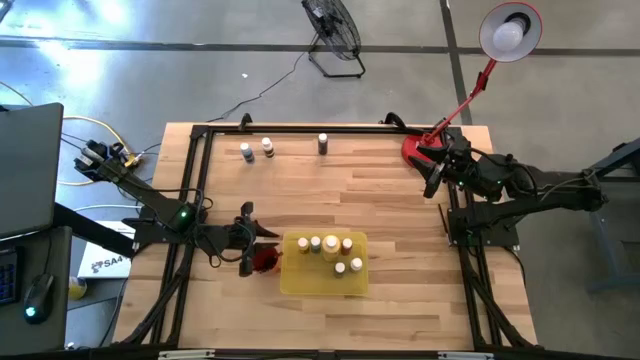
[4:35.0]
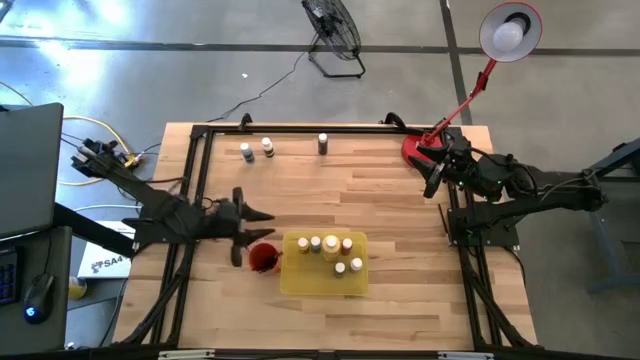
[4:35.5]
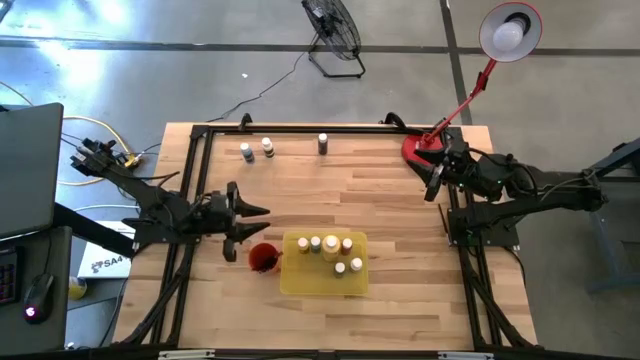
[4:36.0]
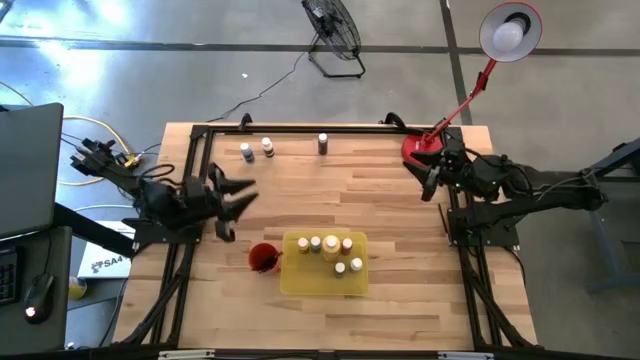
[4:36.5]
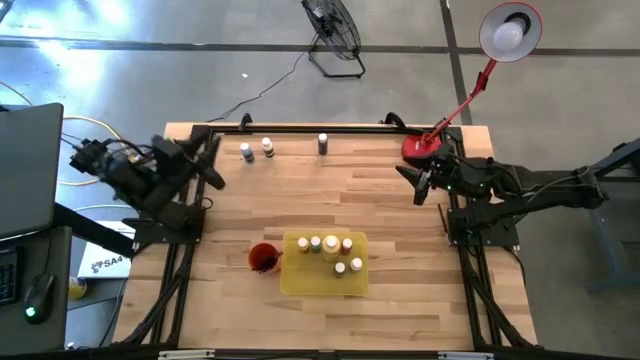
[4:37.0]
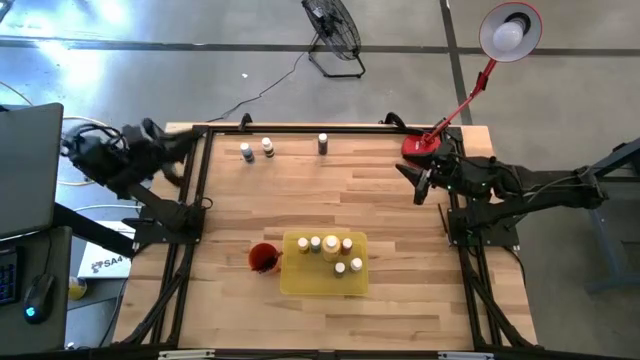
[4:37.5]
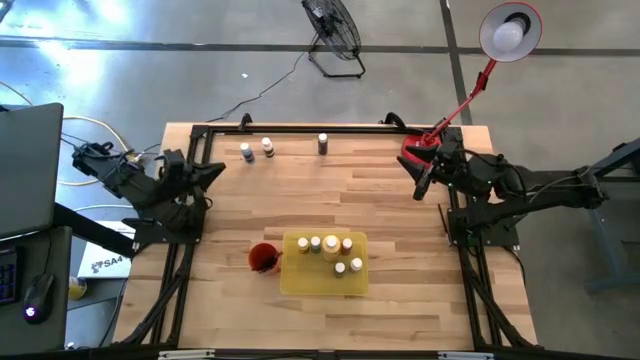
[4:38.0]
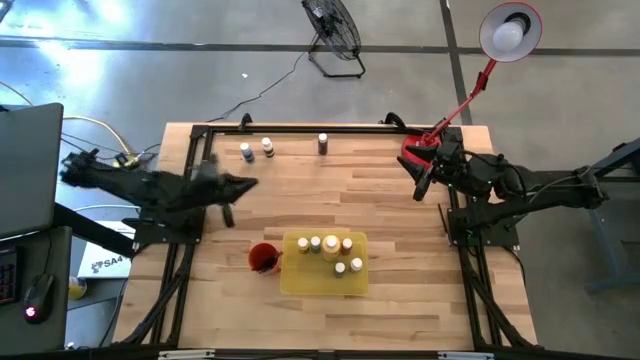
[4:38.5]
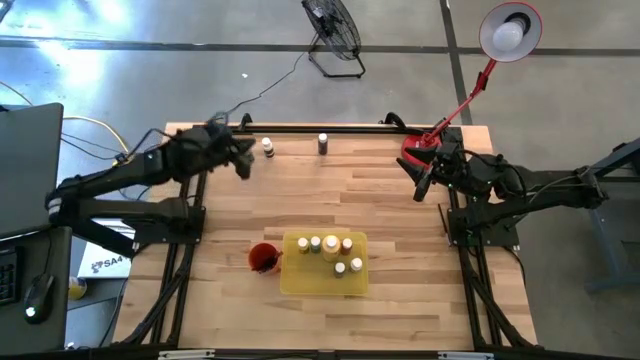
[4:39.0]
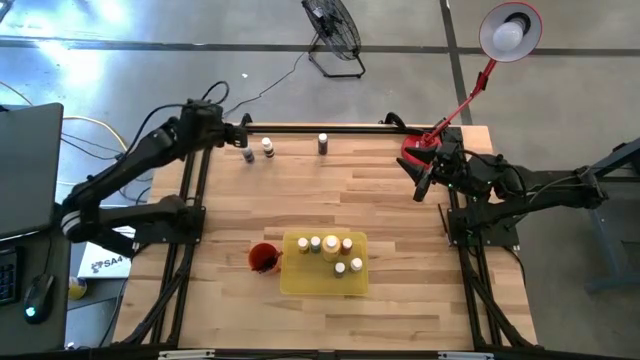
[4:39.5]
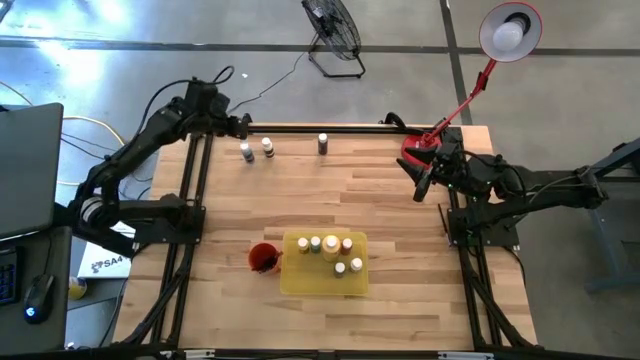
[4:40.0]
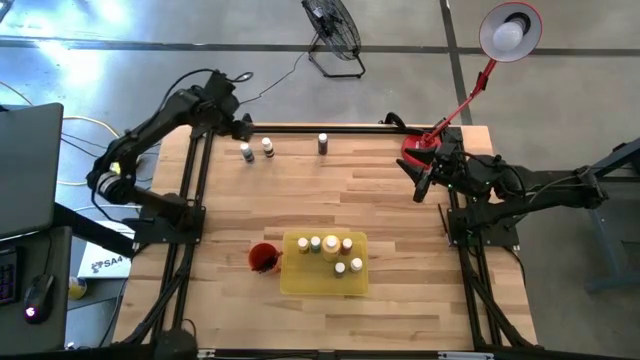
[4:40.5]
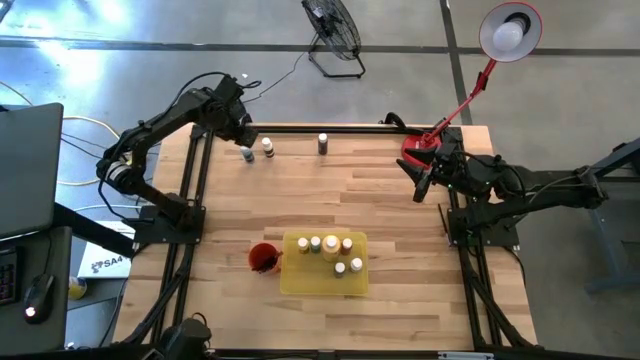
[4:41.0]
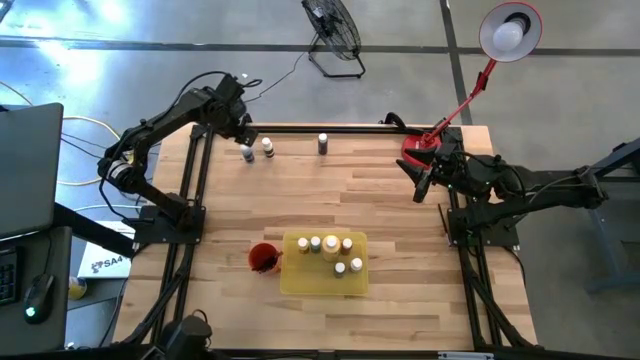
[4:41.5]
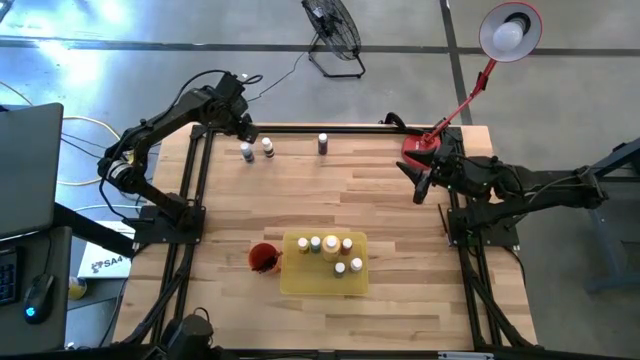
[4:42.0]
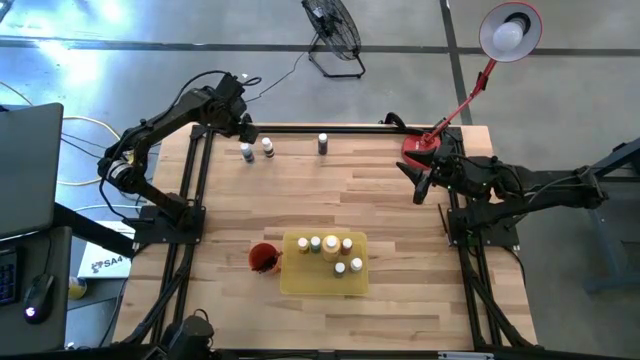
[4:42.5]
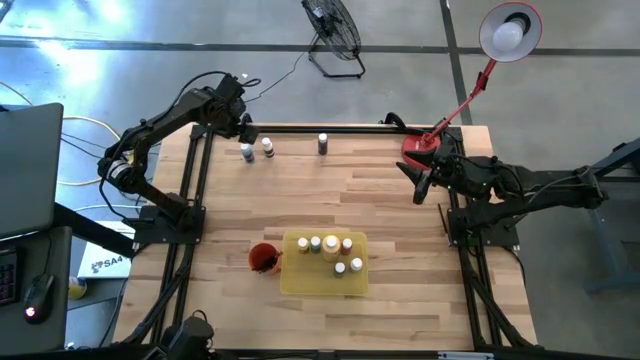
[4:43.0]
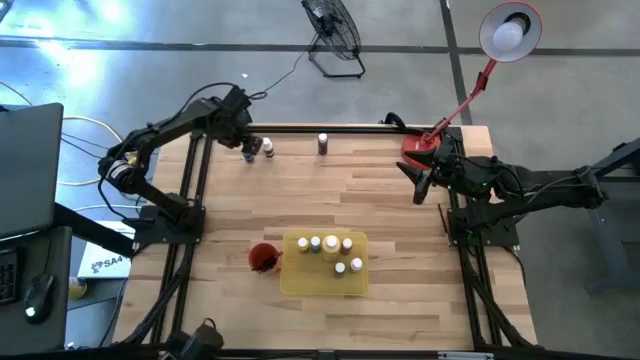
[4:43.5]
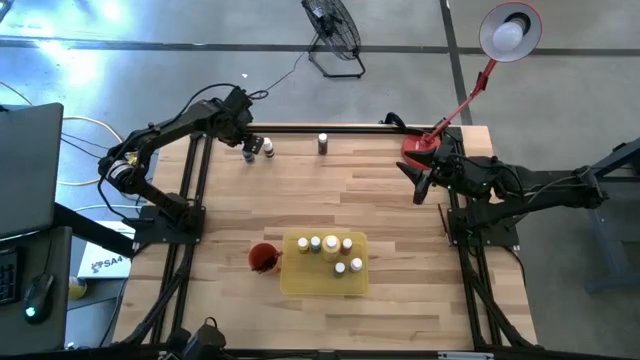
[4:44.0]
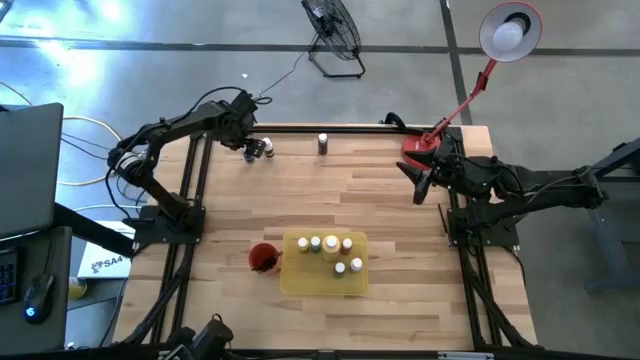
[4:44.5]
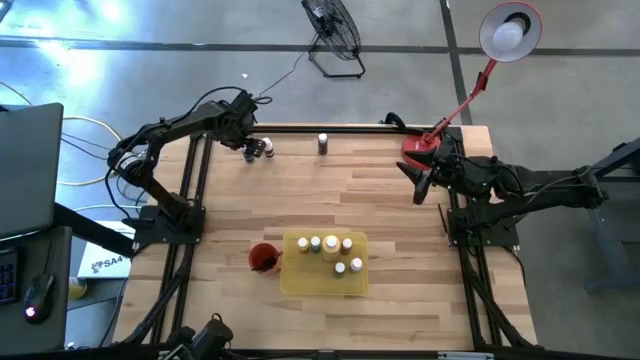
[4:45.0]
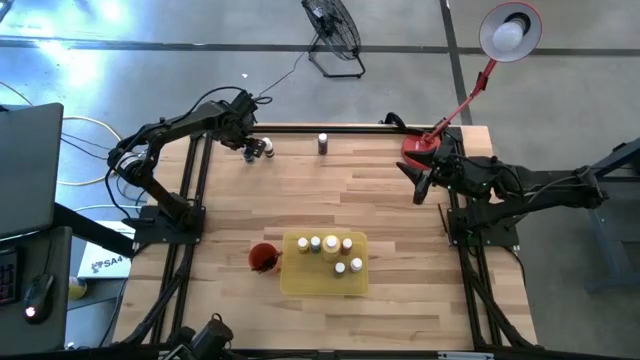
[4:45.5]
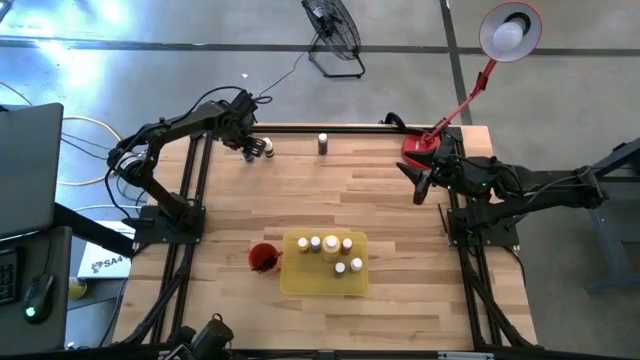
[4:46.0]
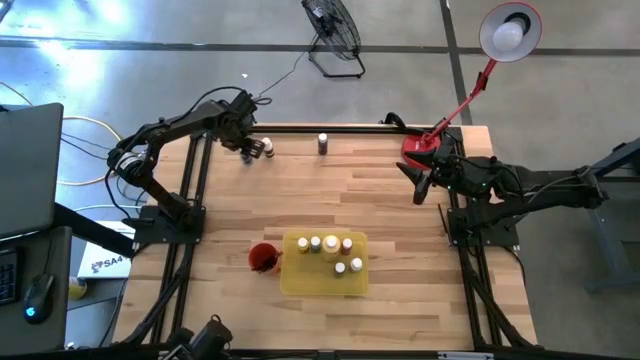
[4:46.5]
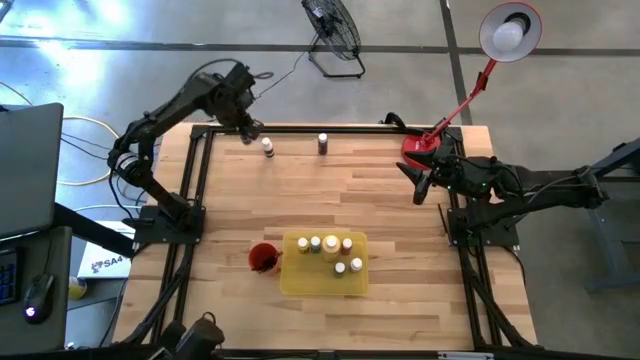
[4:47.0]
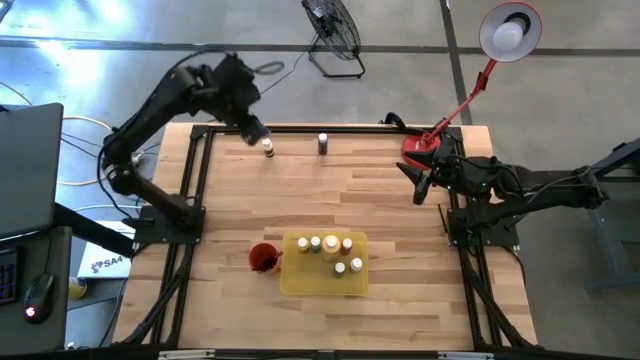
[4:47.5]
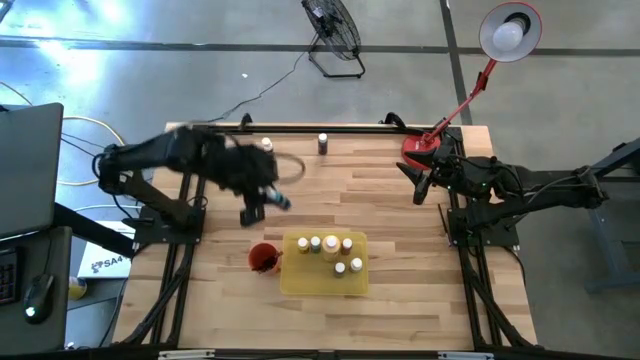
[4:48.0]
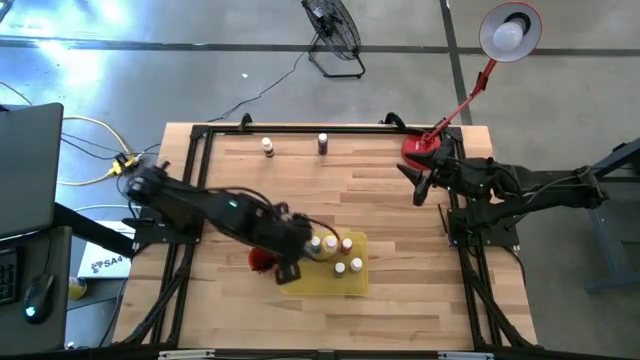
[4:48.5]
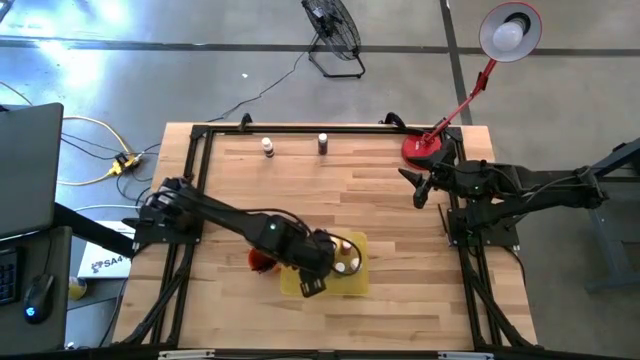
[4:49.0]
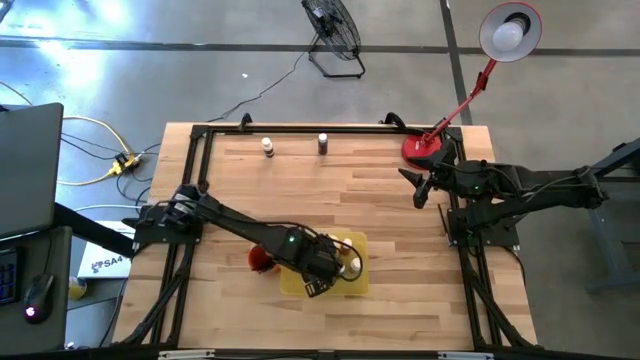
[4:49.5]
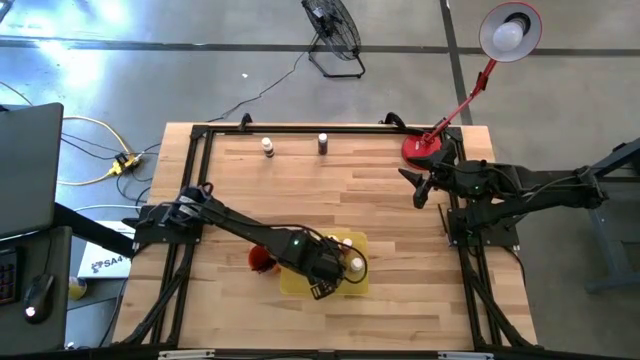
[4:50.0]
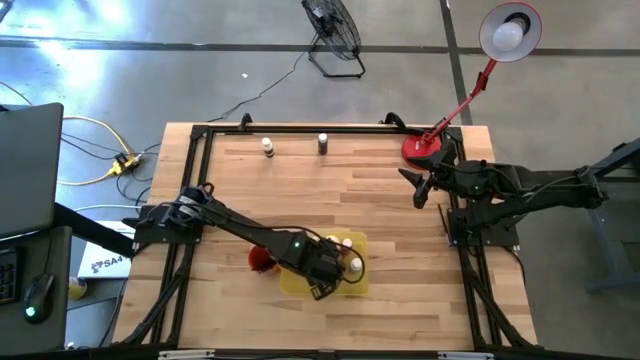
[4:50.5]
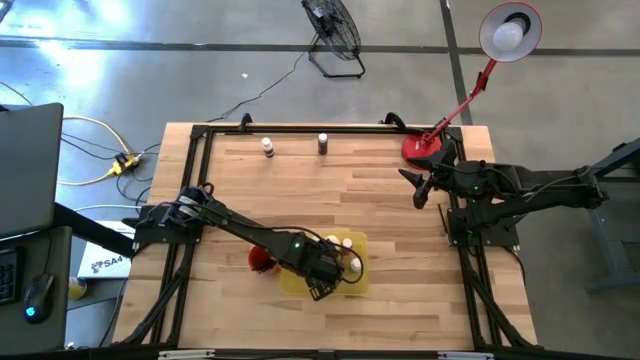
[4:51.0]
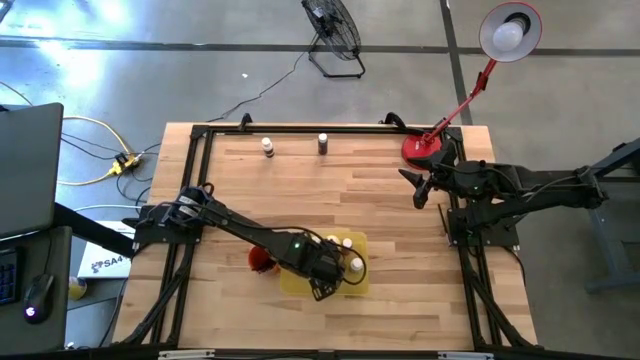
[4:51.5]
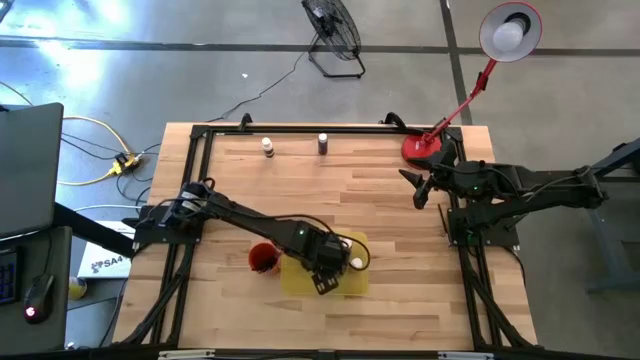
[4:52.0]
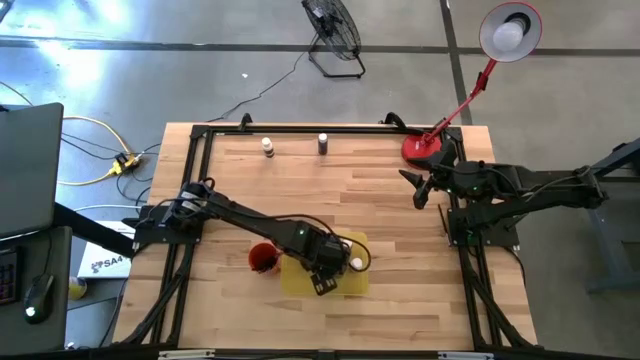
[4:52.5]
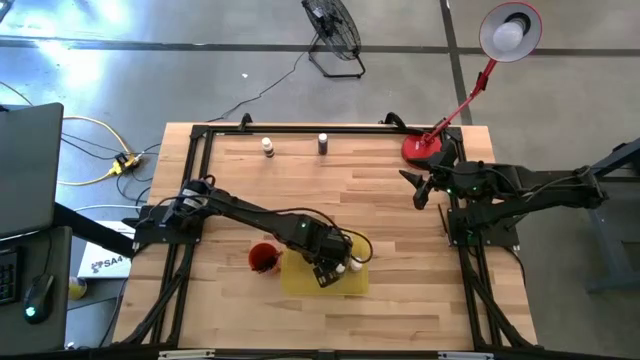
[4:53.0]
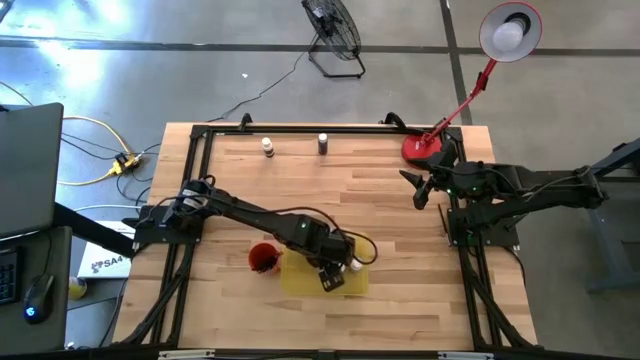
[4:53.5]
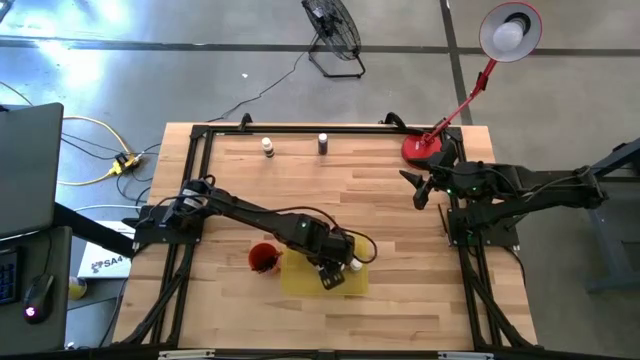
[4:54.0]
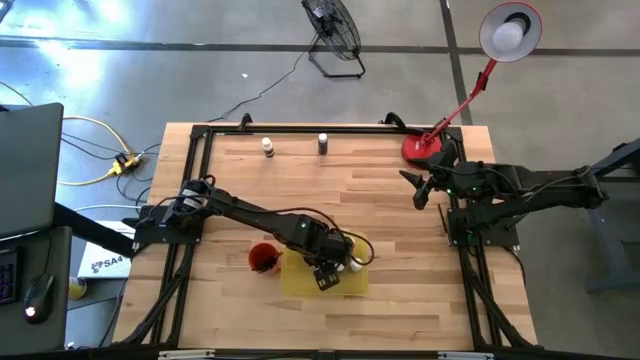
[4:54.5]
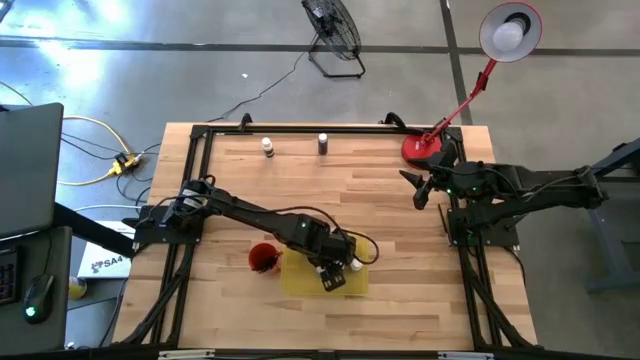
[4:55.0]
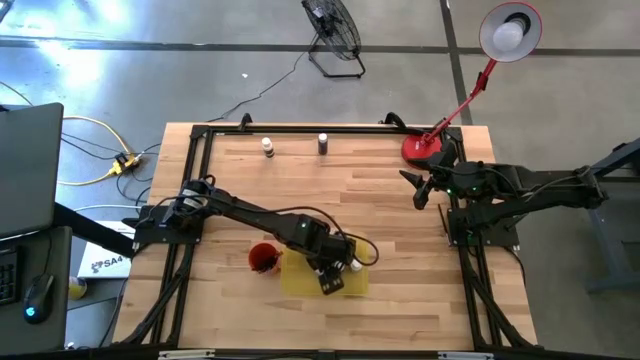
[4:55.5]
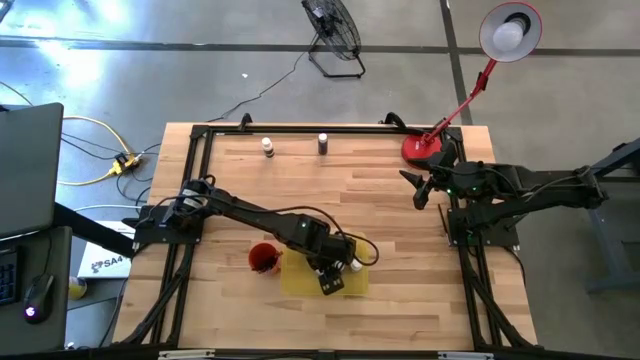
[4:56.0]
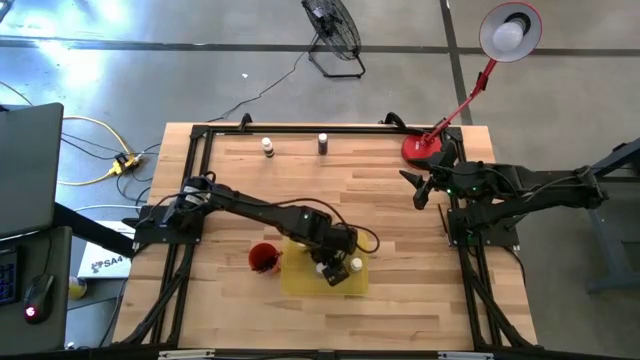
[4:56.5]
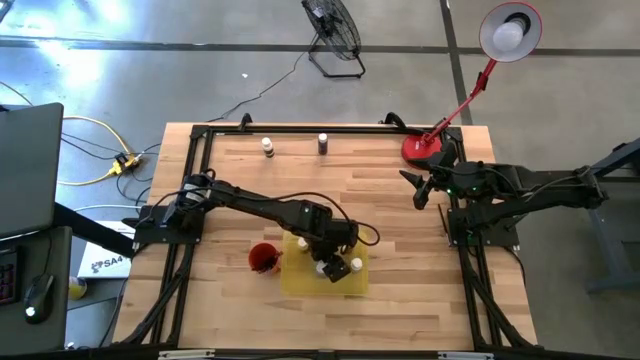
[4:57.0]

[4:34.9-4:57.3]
Task: Pick & Place Paint Supplies
Put the blue paint bottle into the yellow bin
